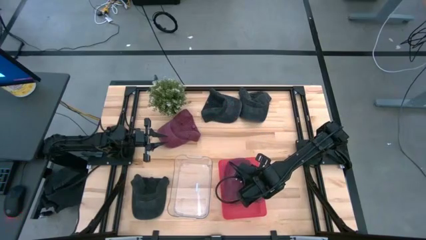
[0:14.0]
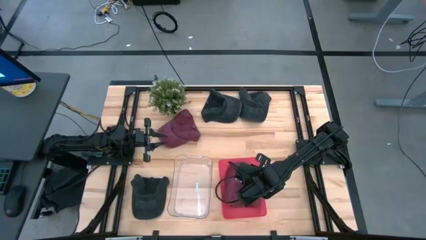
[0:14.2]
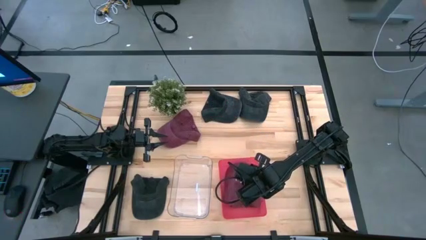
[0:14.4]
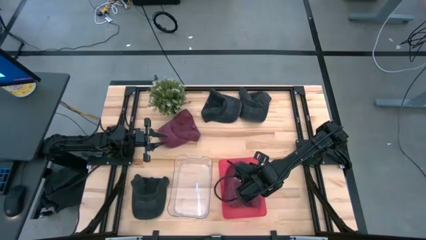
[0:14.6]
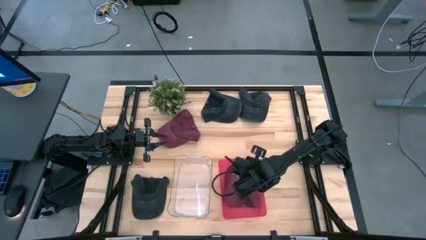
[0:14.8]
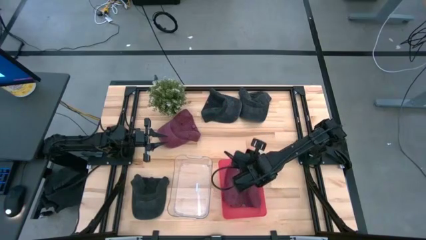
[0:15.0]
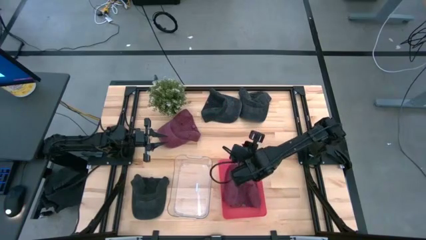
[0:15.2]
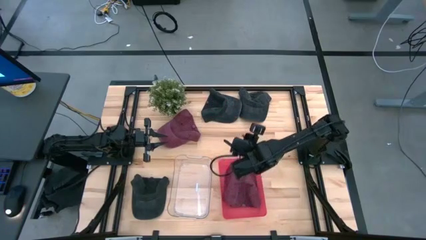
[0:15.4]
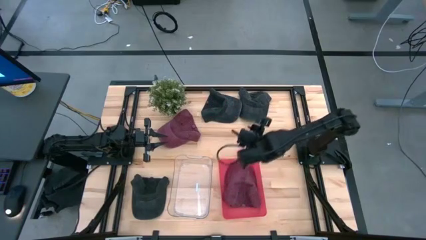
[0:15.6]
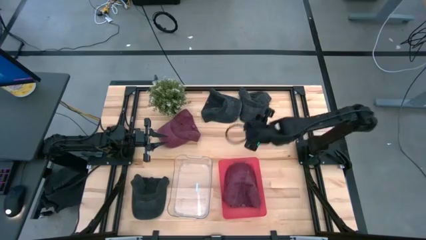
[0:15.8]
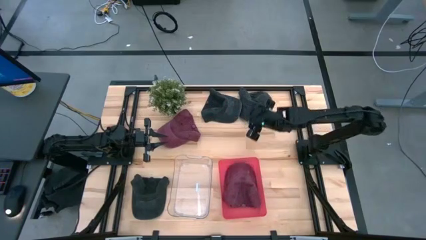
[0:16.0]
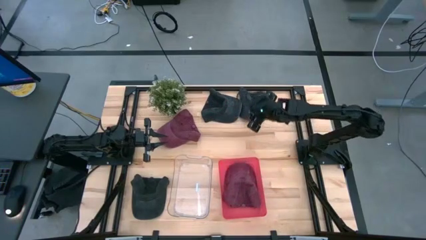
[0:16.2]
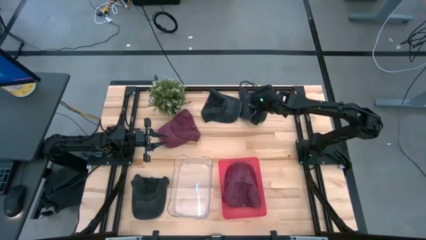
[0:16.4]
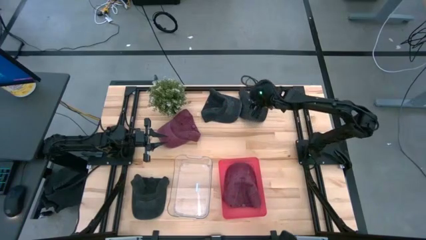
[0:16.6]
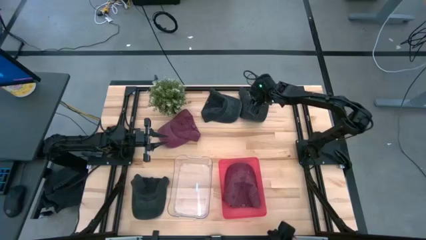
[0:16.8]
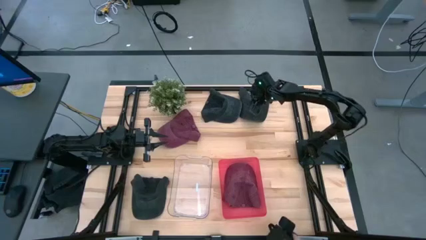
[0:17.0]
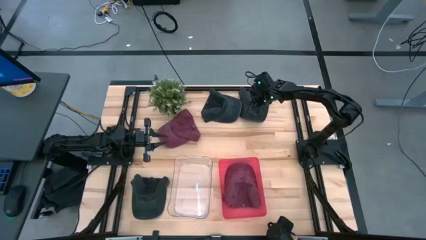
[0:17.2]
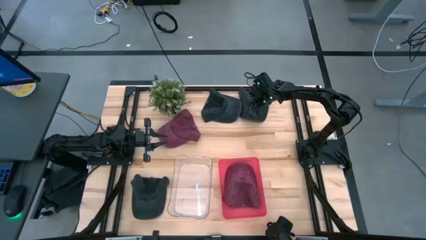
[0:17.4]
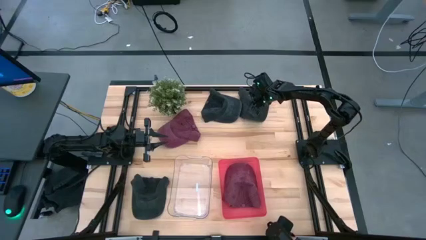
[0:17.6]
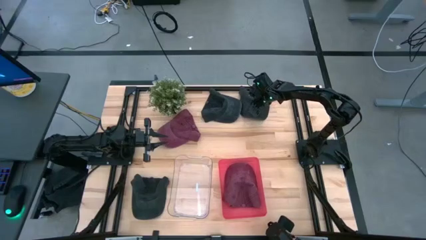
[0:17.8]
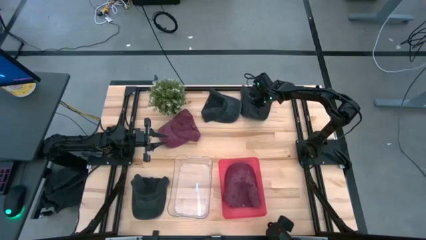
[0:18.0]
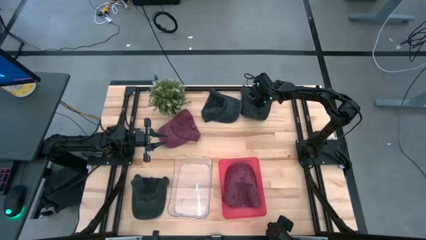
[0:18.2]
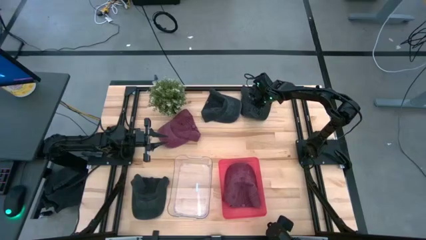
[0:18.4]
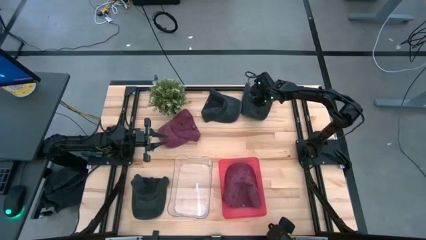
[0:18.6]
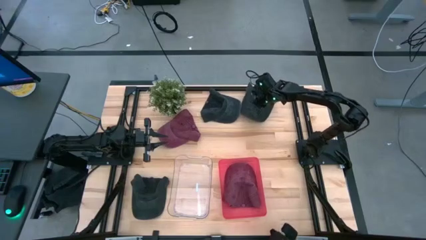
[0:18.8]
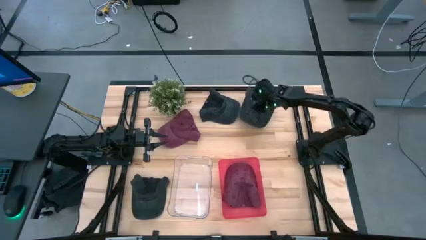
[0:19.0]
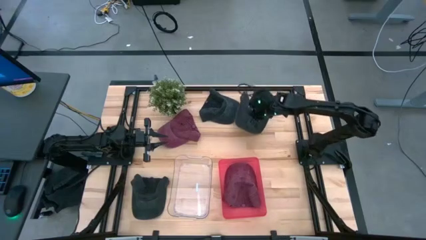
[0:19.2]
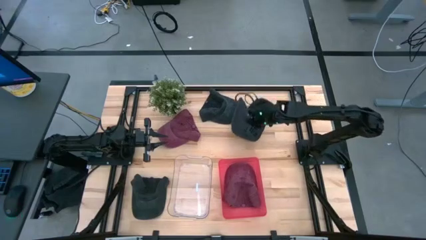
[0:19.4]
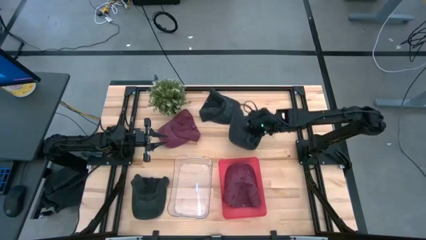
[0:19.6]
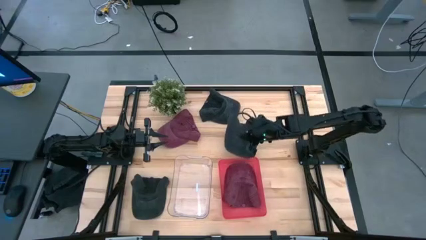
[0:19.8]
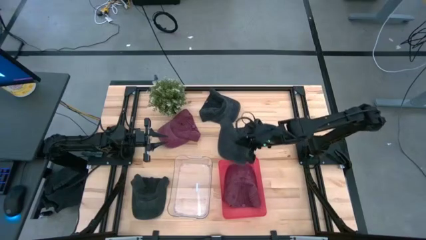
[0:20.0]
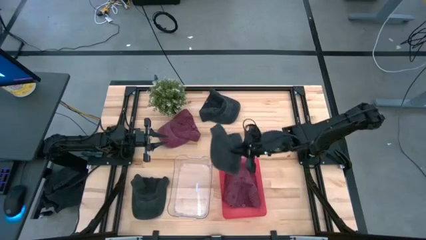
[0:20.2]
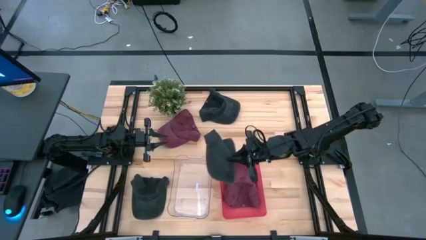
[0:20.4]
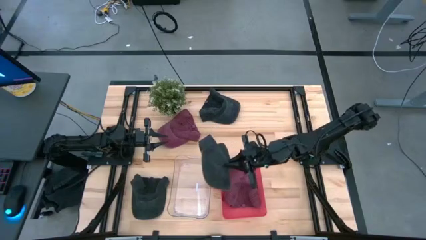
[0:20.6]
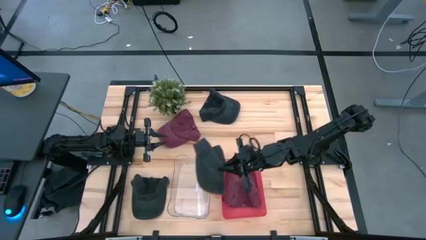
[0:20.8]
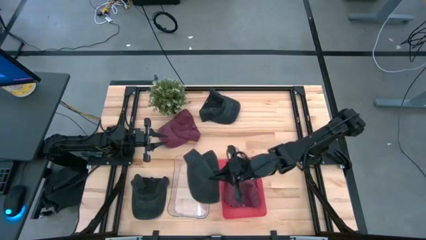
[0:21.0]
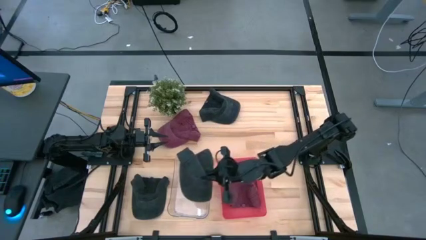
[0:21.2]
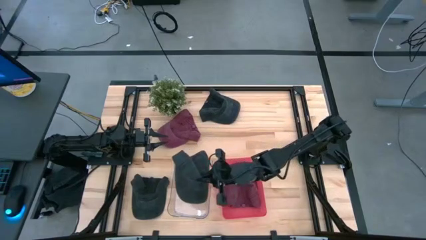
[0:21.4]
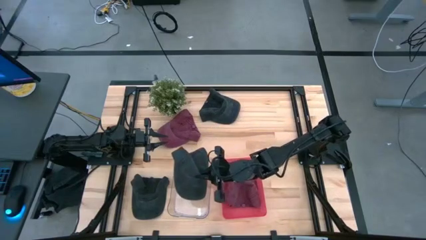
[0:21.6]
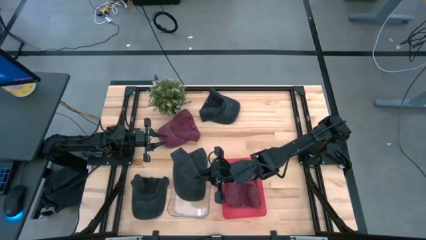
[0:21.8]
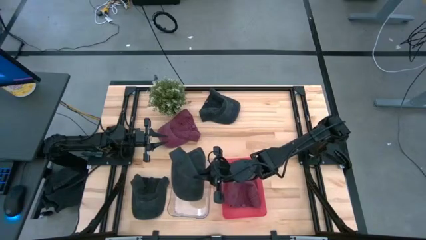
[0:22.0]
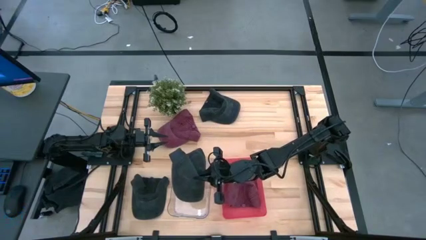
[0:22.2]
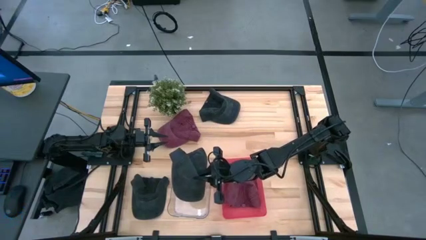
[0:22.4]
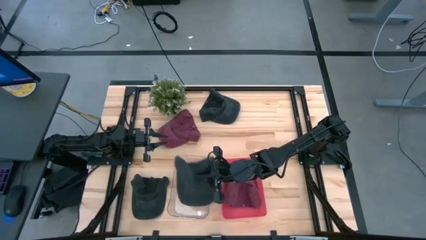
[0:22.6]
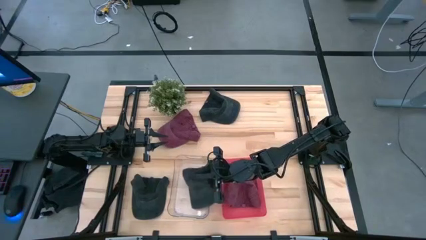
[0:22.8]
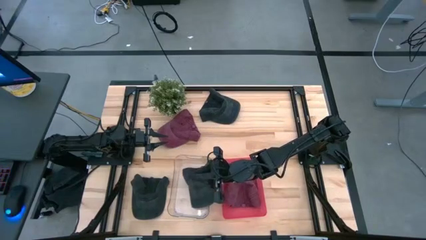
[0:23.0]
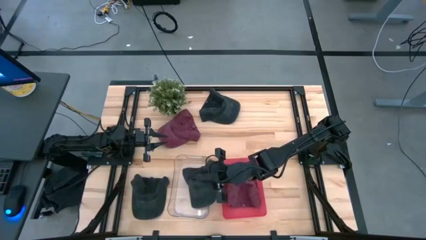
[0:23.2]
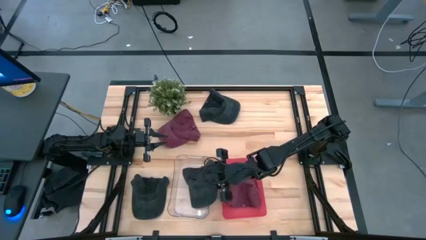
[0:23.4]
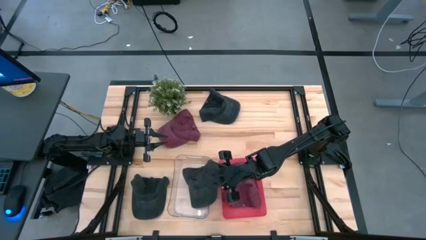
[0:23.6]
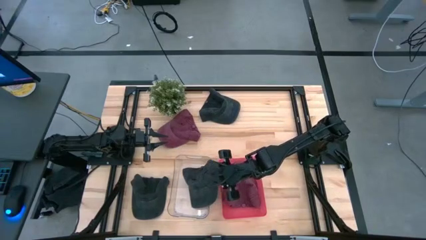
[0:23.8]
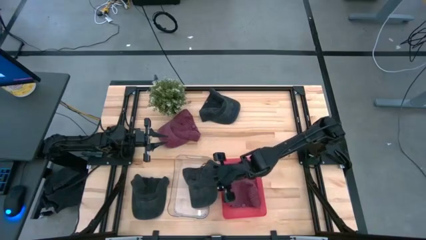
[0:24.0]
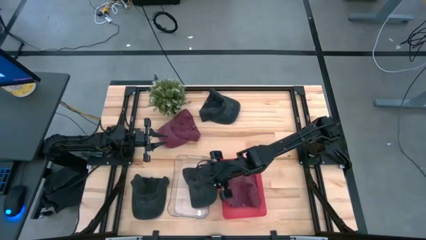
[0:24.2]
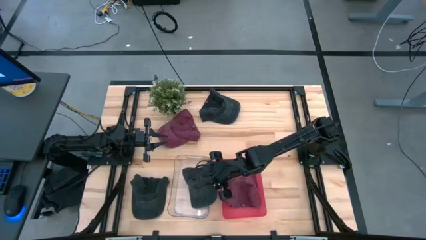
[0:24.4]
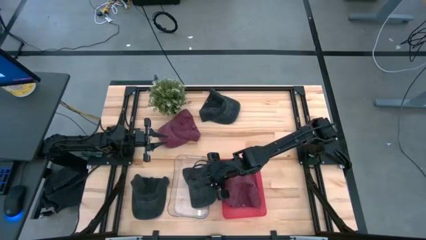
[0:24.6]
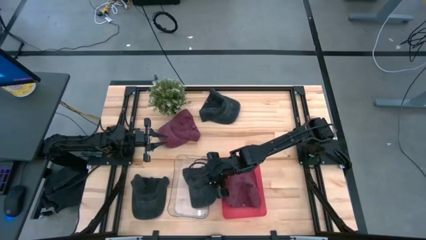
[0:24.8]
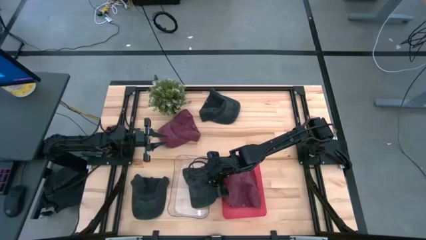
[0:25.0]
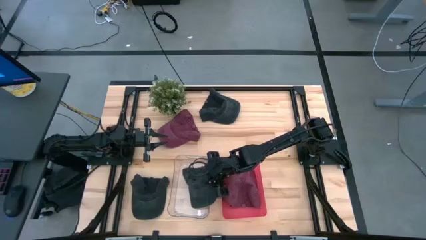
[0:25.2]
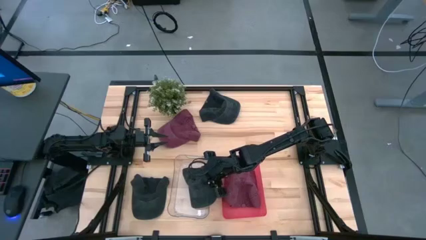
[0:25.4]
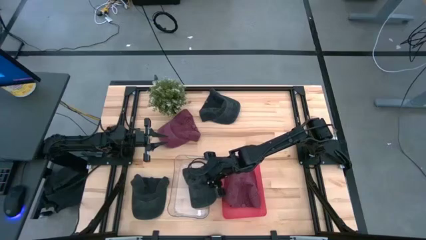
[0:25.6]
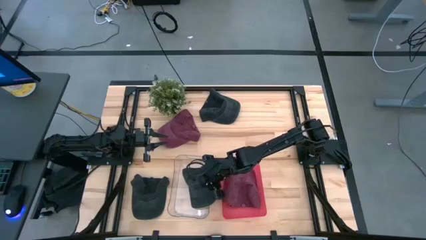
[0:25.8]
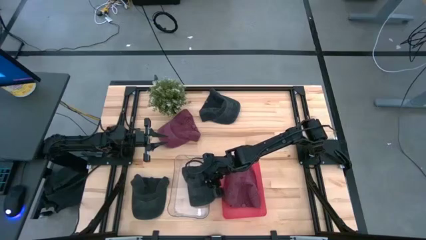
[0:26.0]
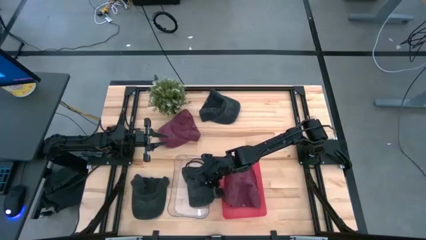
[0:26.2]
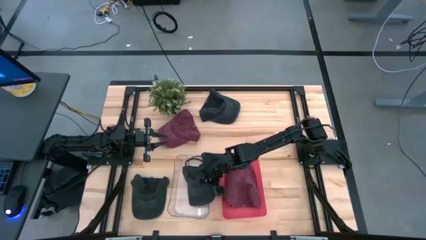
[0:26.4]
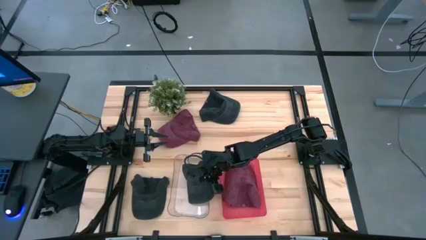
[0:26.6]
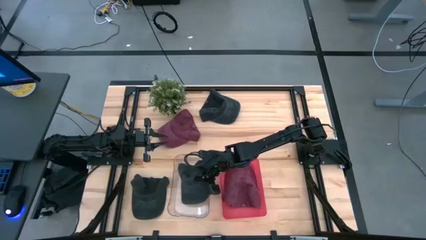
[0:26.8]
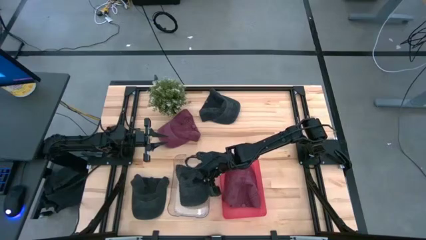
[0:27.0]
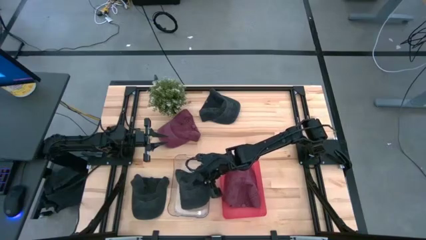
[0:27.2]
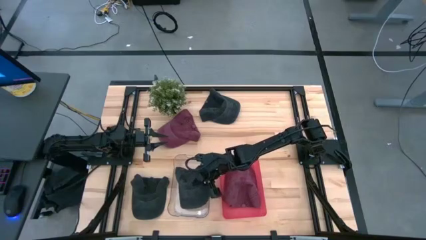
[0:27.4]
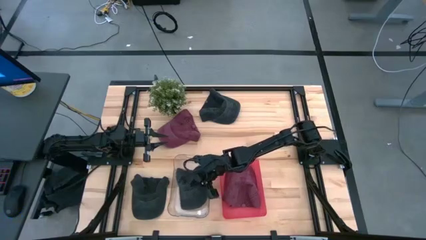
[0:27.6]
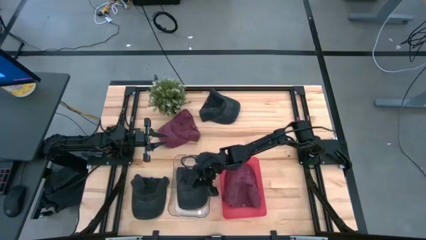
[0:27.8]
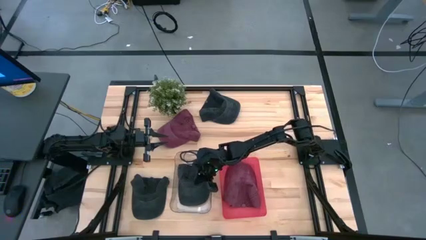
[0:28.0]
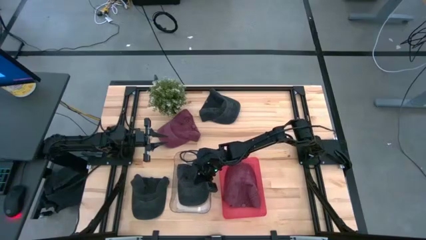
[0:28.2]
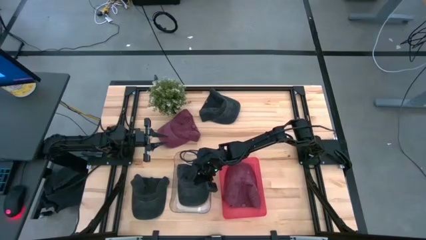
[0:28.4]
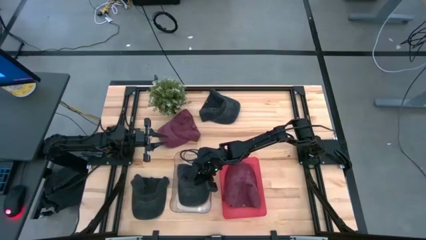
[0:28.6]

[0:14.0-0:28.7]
Task: Pick & Place hat
Put the top right black cap into the transparent bin
